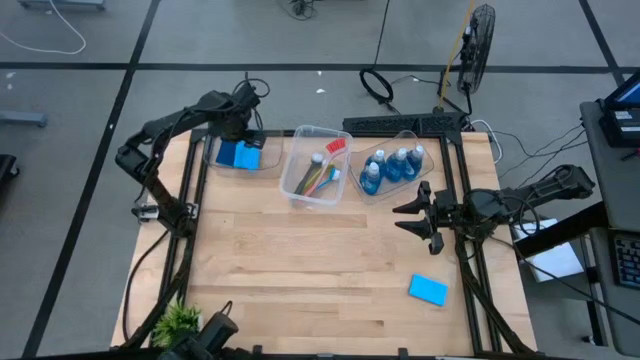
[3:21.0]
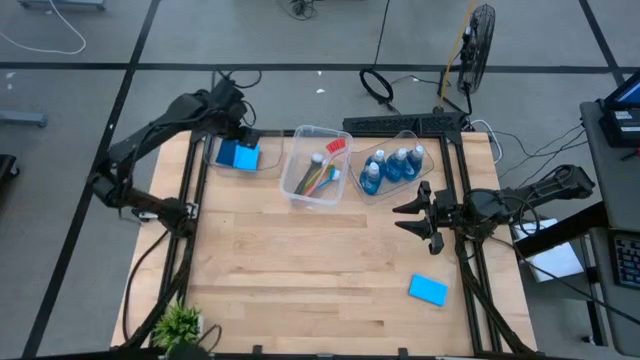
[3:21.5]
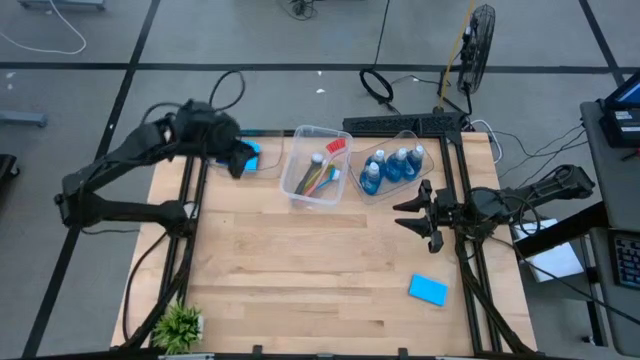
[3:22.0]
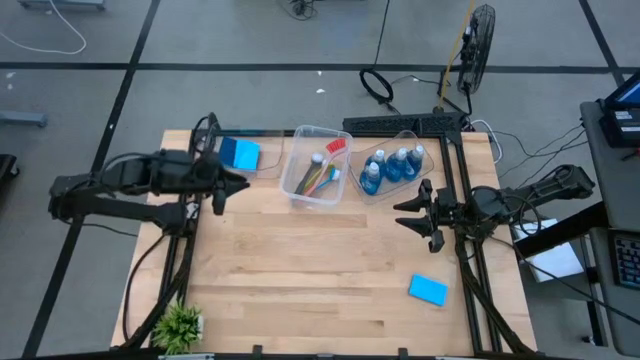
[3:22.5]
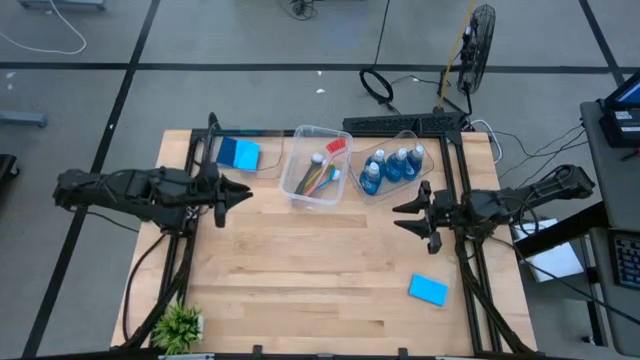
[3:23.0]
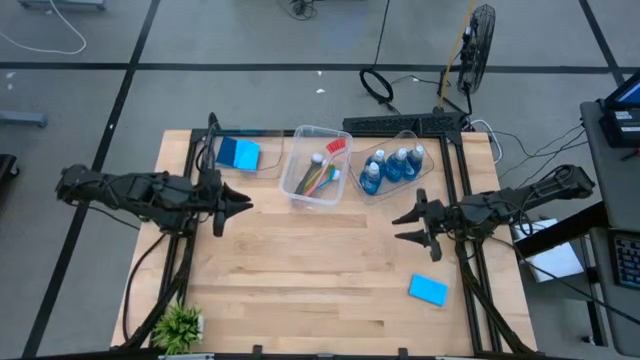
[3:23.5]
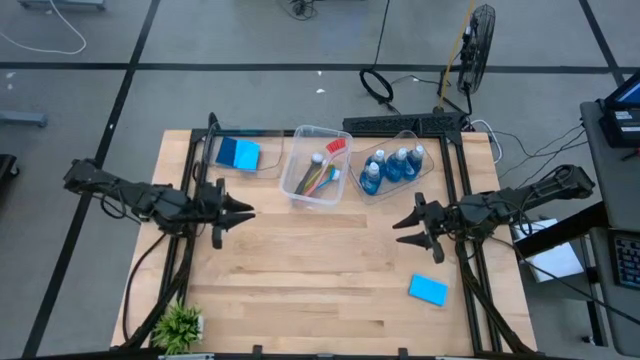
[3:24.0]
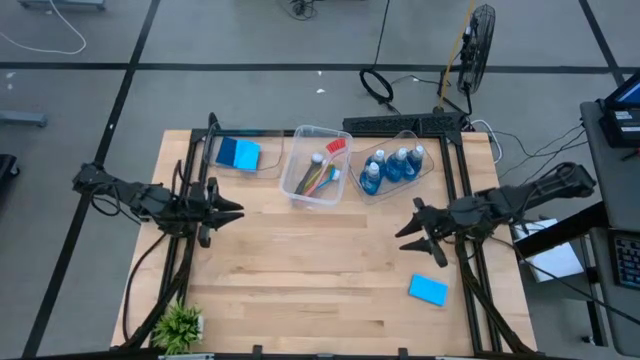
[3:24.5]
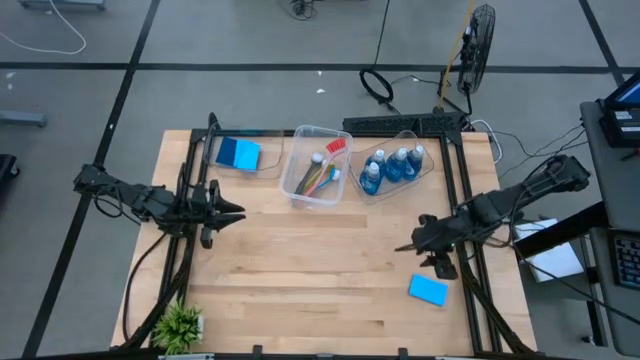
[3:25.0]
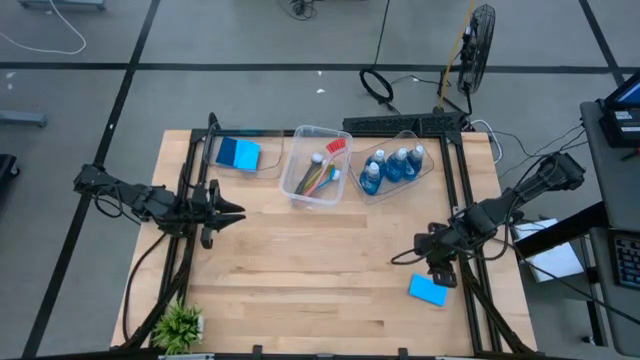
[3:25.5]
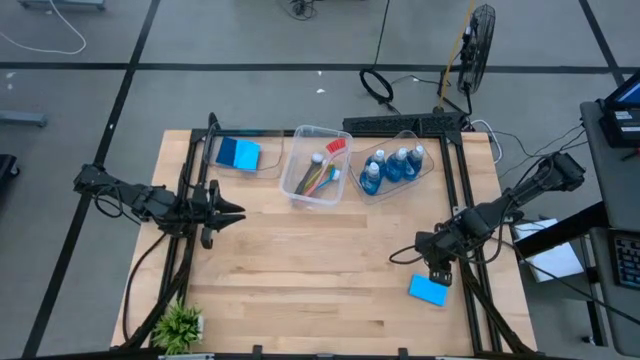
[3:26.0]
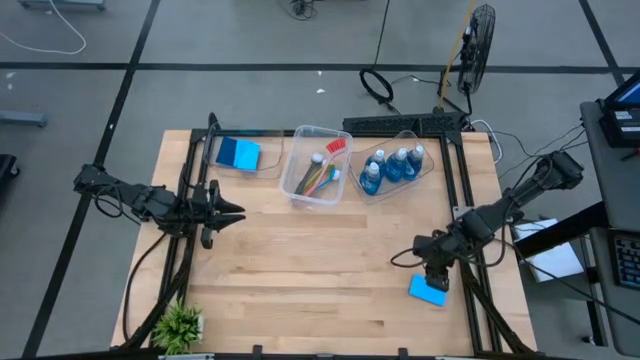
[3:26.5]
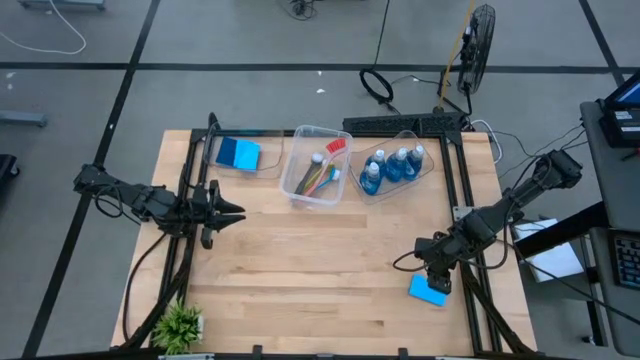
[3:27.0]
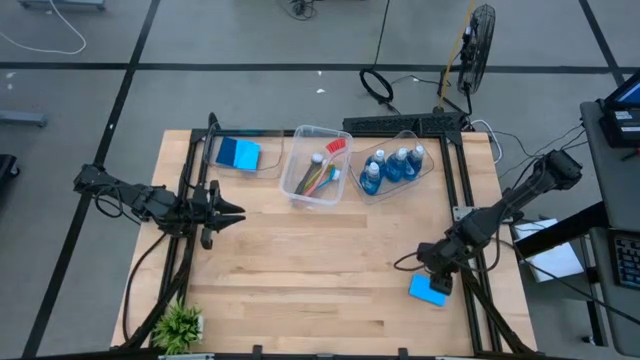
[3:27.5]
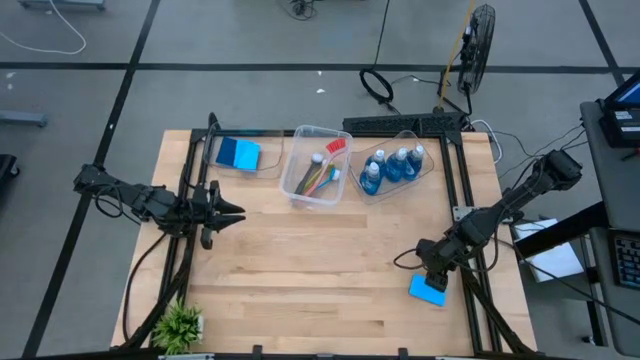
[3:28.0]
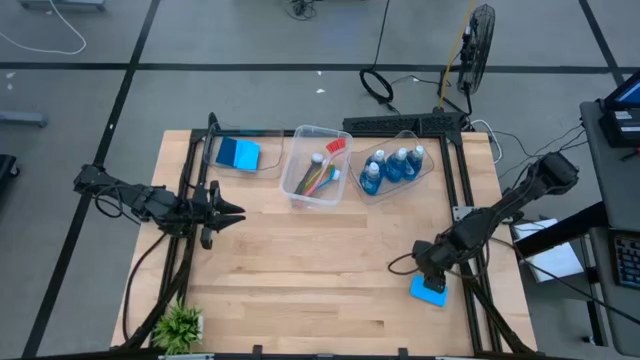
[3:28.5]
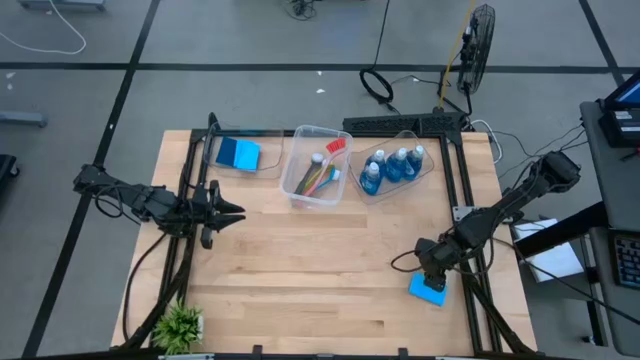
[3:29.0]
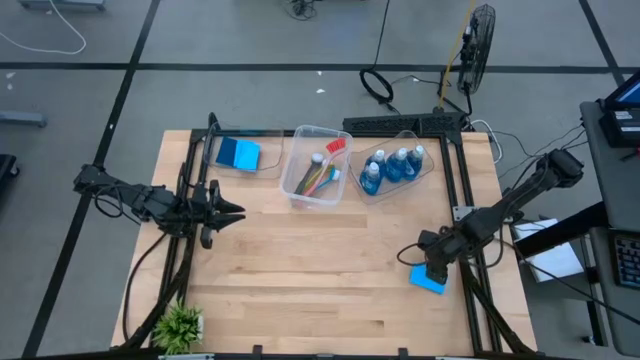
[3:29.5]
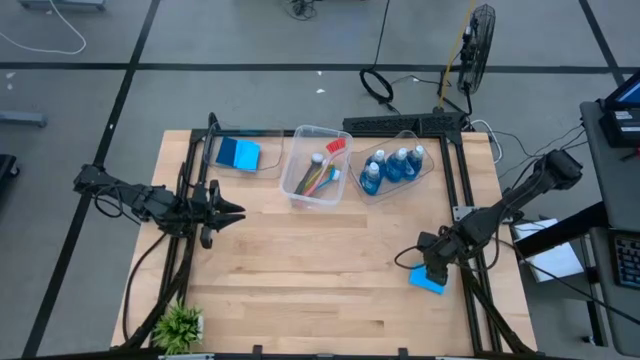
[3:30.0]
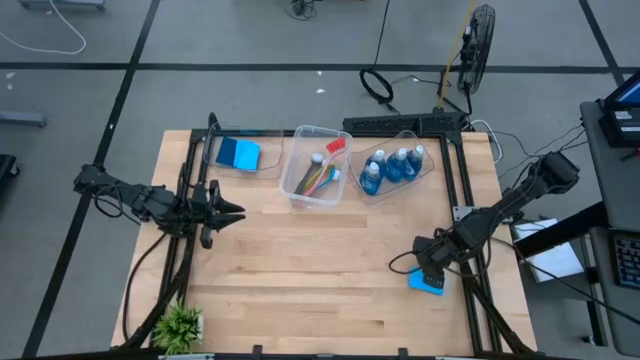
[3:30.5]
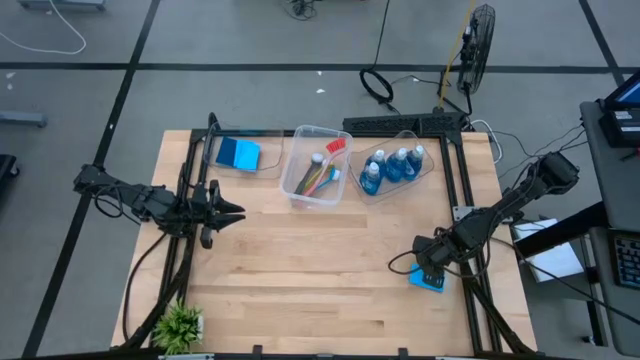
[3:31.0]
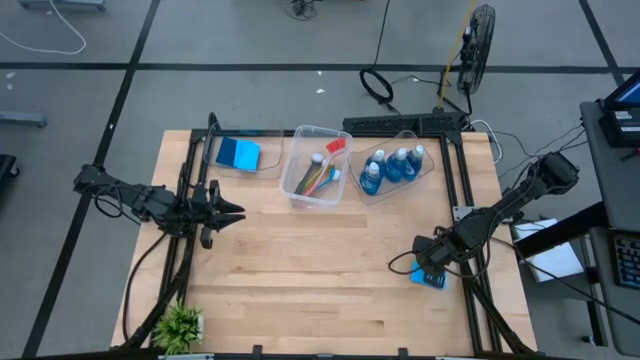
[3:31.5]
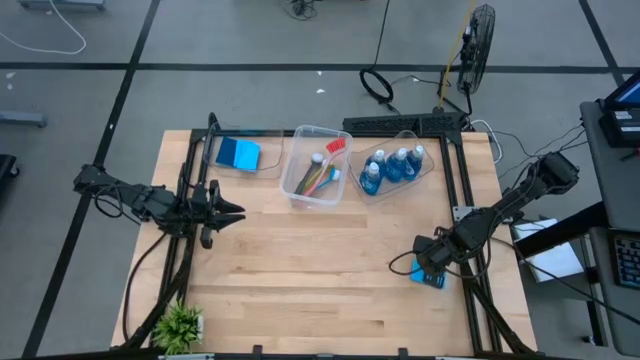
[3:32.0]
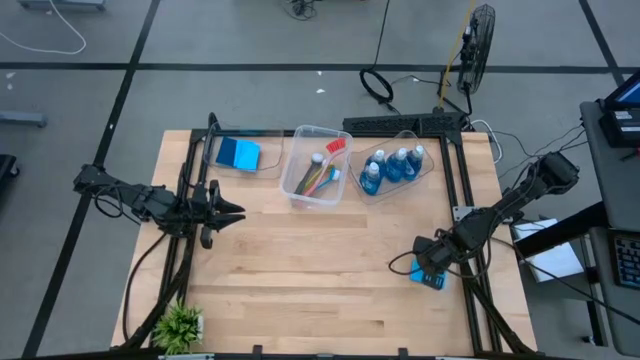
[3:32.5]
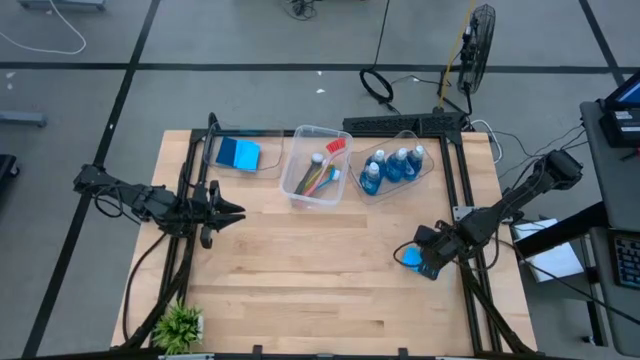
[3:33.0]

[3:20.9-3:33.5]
Task: Pick & Place Kitchen Sink Supplies
Put the blue sponge into the left transparent bin

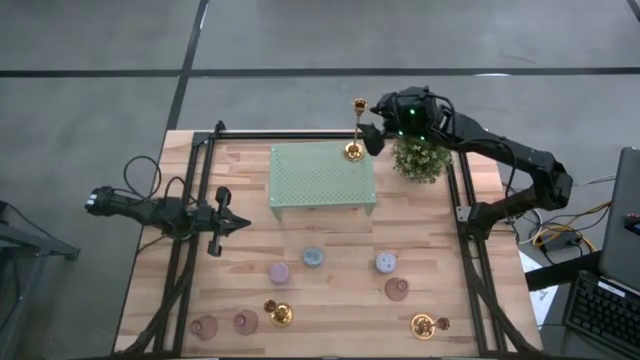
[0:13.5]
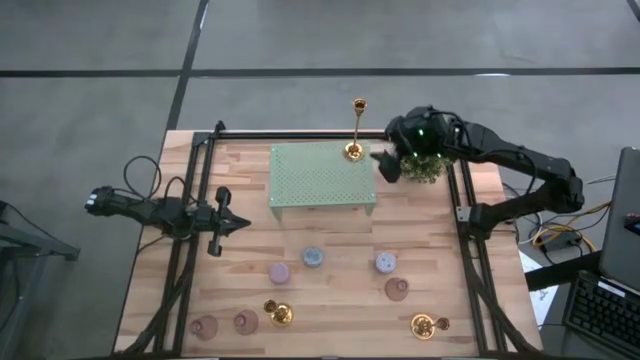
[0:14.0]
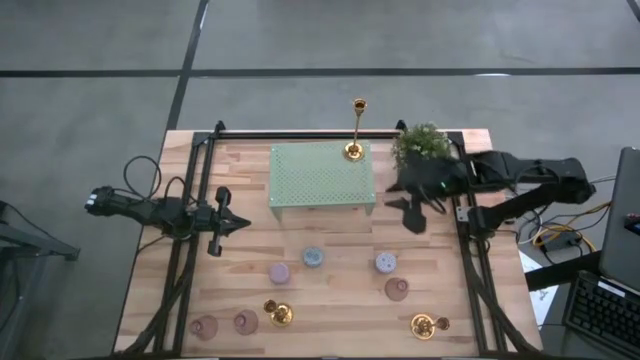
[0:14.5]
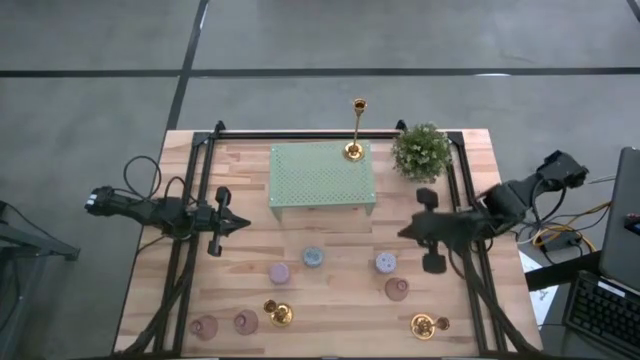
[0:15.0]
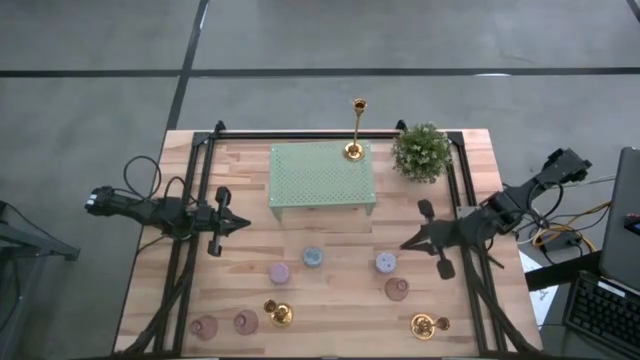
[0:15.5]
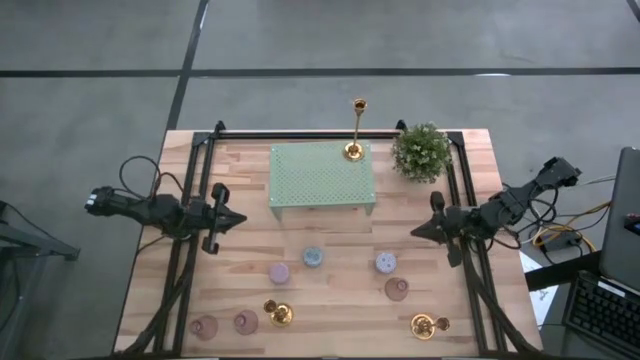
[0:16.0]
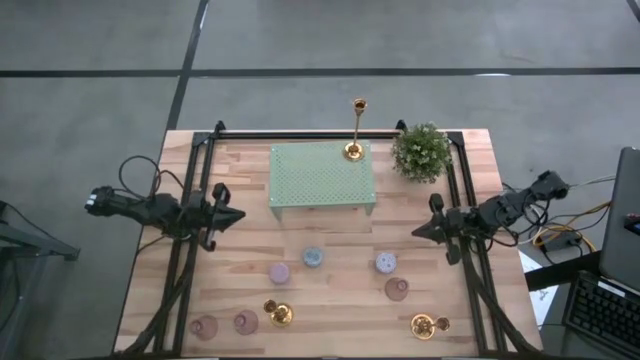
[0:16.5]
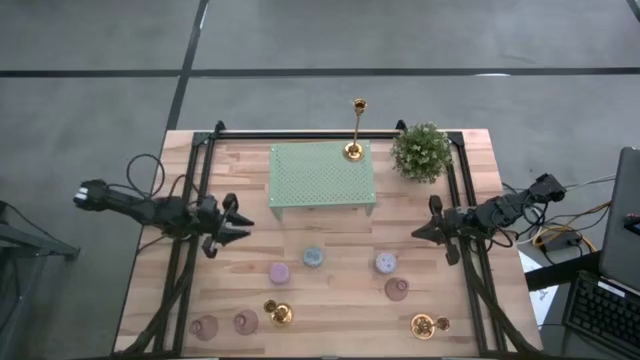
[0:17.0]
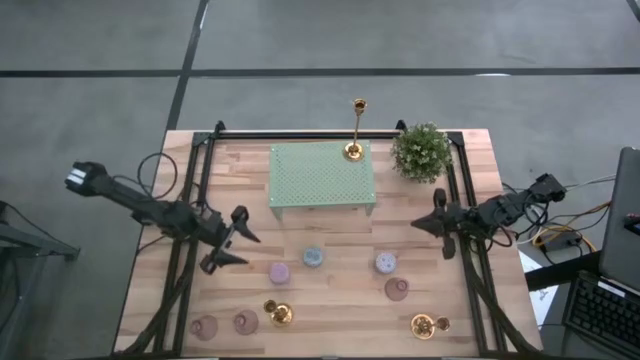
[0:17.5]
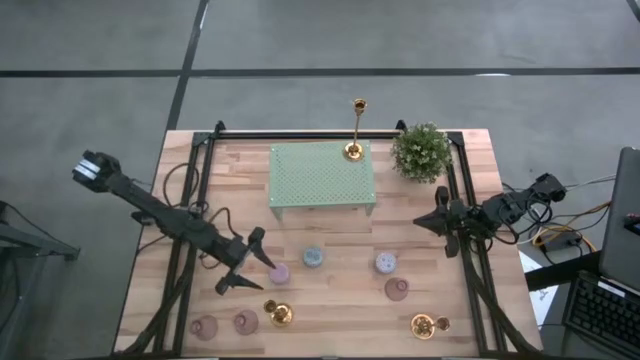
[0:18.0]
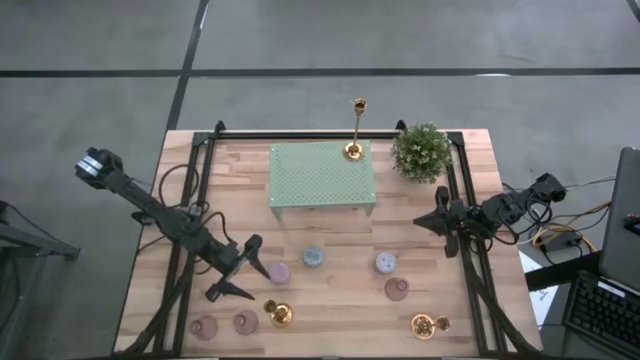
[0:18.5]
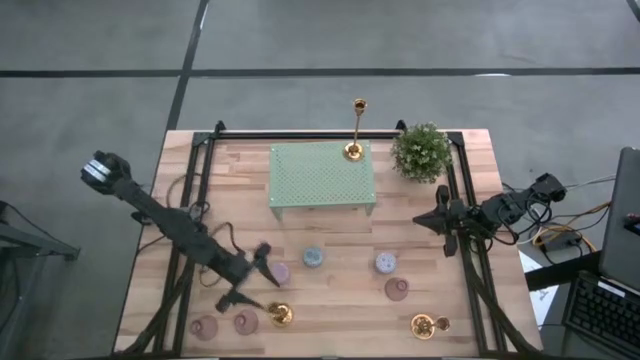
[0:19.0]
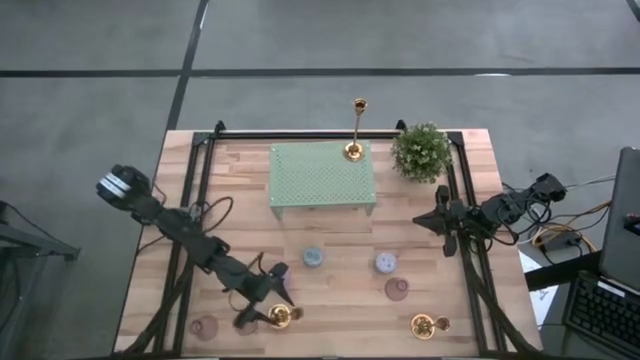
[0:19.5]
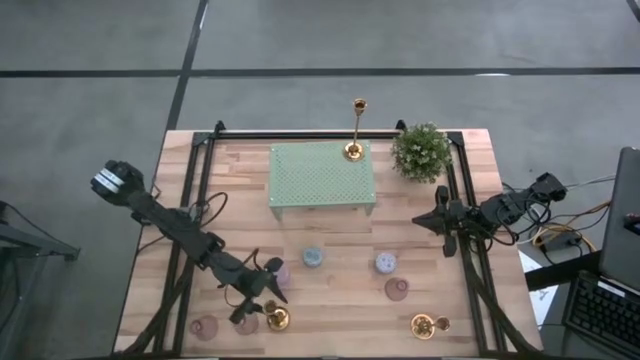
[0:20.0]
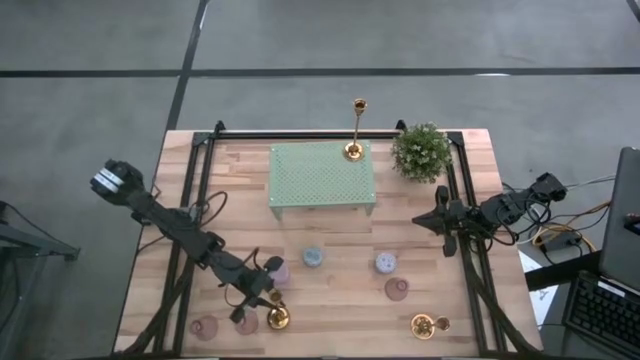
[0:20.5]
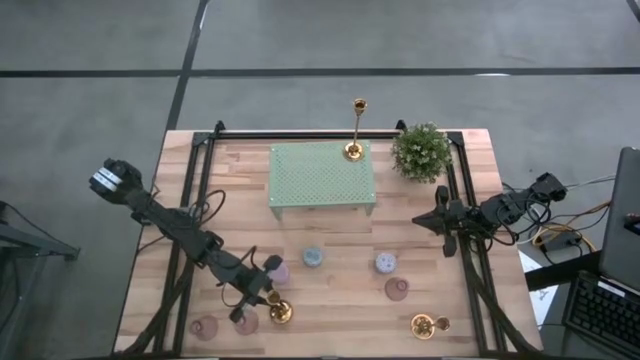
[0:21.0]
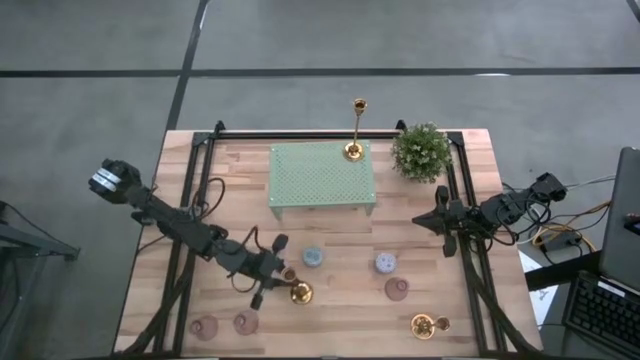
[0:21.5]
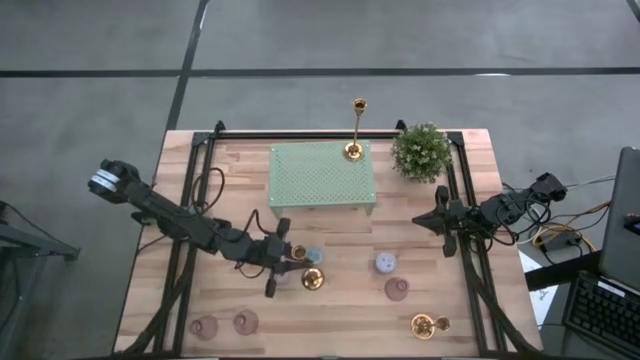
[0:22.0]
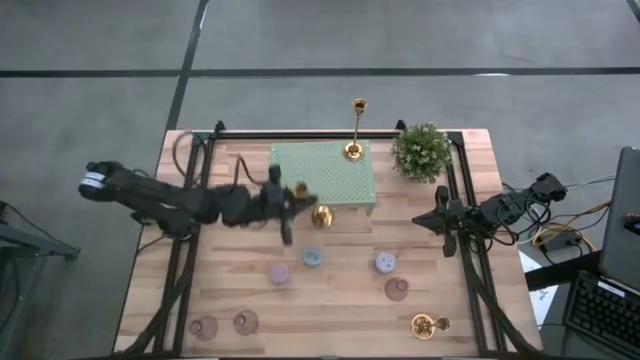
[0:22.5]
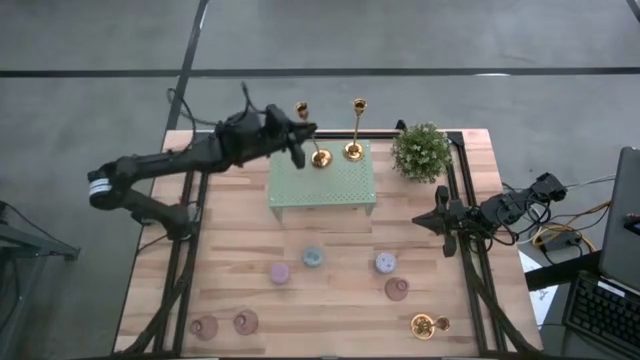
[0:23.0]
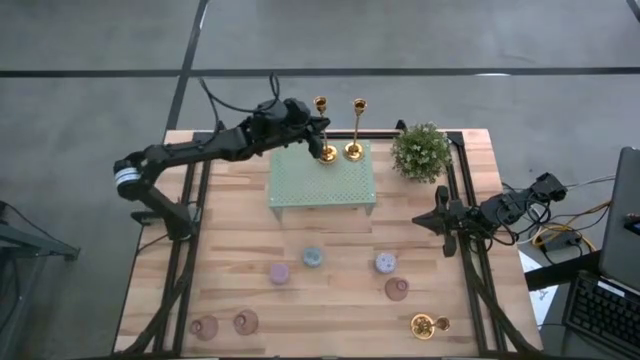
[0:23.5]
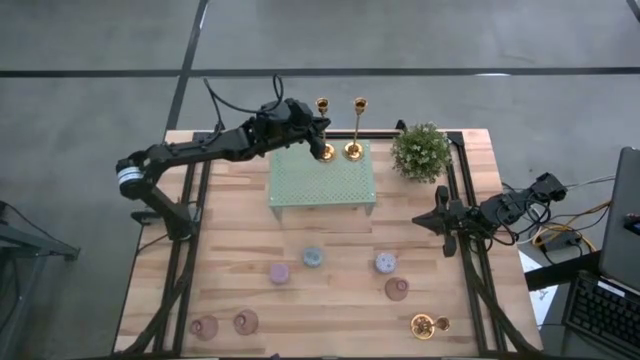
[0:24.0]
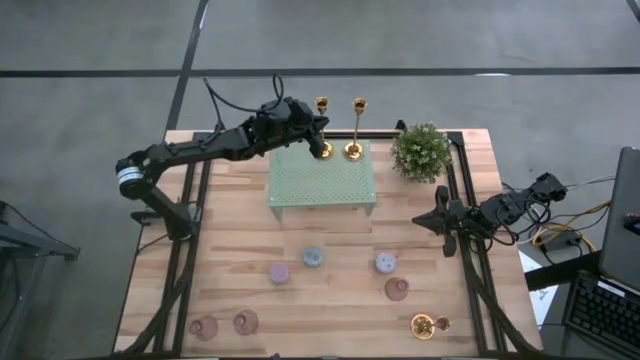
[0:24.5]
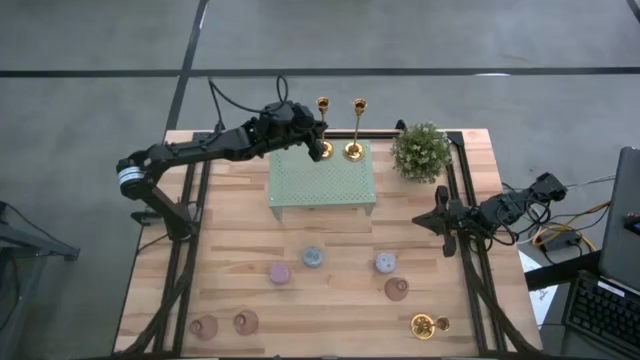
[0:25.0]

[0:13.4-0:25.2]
Task: Pick & Place candle stick holders
Put the left gold candle holder on the shelf
